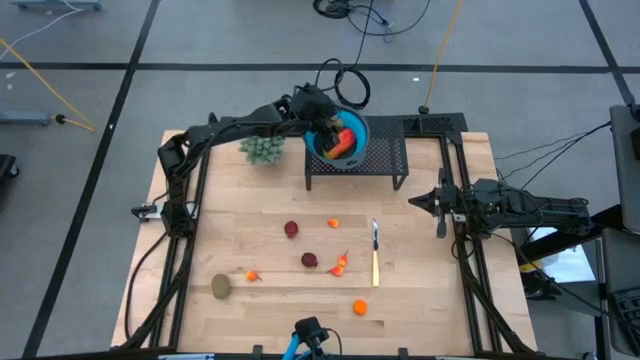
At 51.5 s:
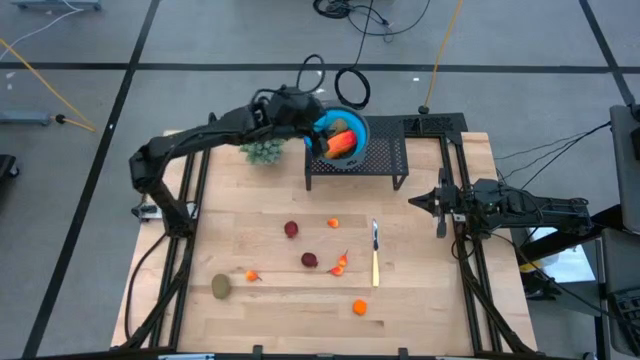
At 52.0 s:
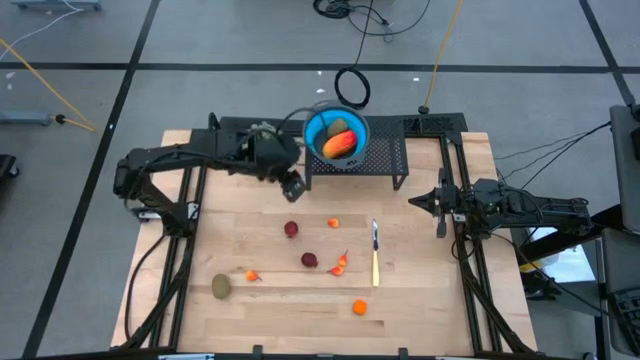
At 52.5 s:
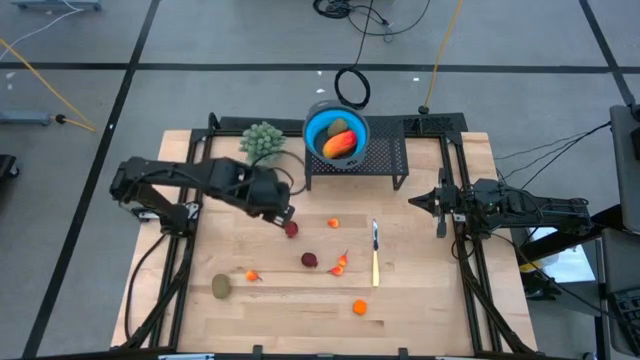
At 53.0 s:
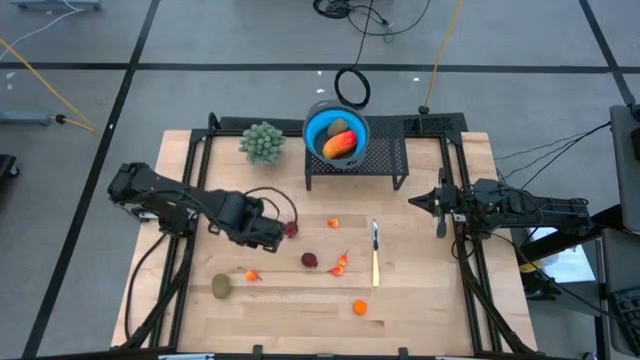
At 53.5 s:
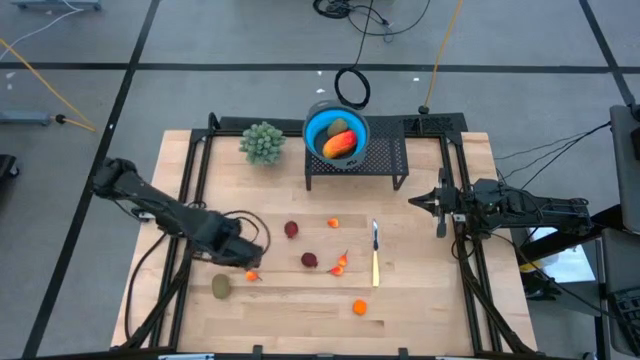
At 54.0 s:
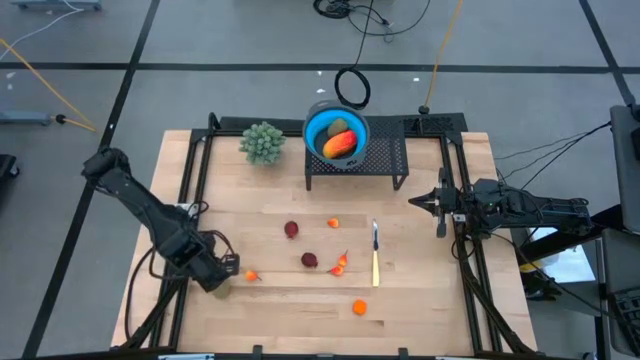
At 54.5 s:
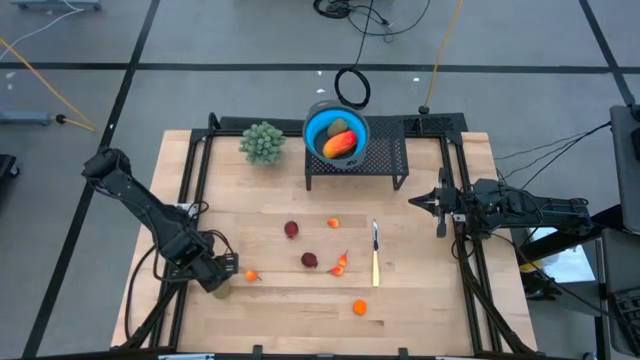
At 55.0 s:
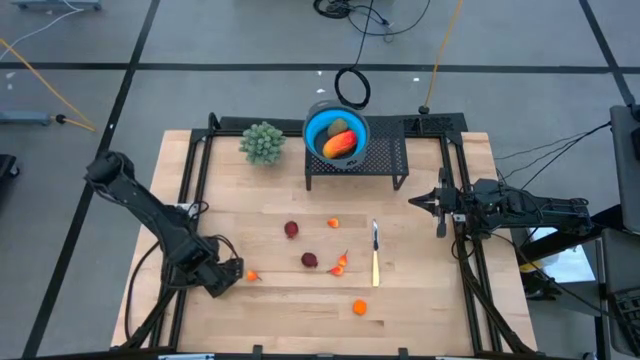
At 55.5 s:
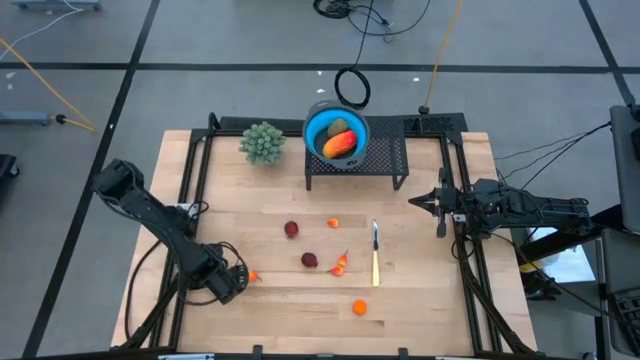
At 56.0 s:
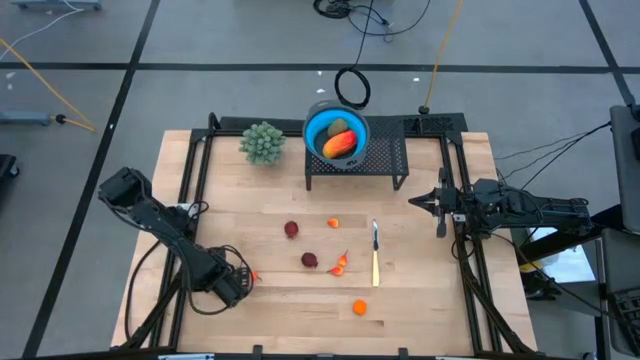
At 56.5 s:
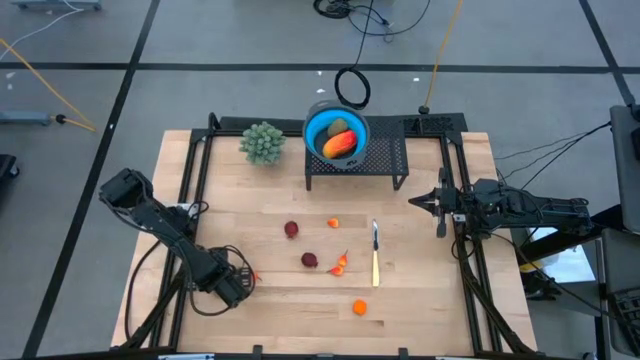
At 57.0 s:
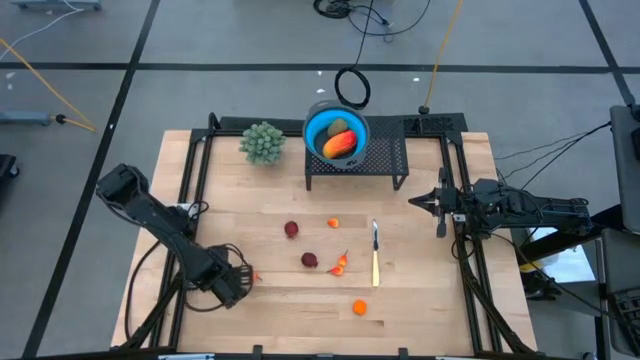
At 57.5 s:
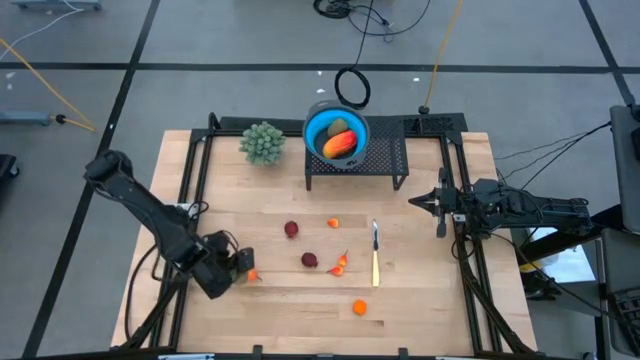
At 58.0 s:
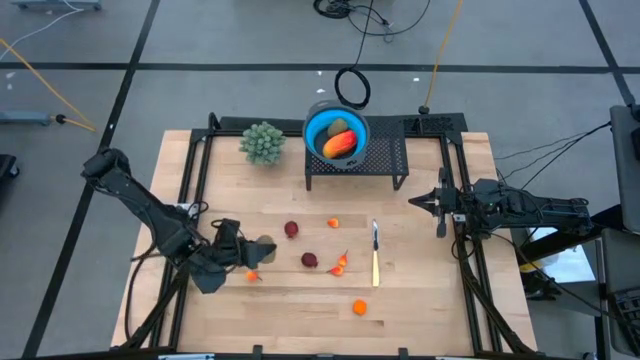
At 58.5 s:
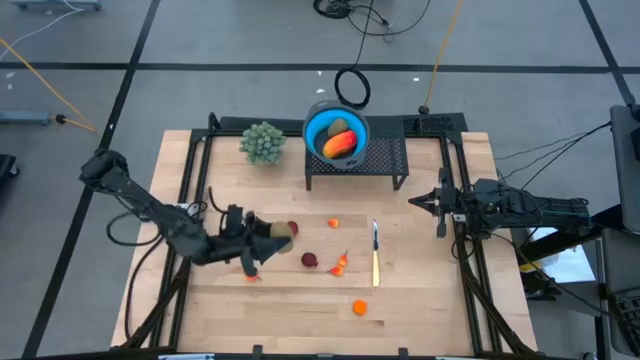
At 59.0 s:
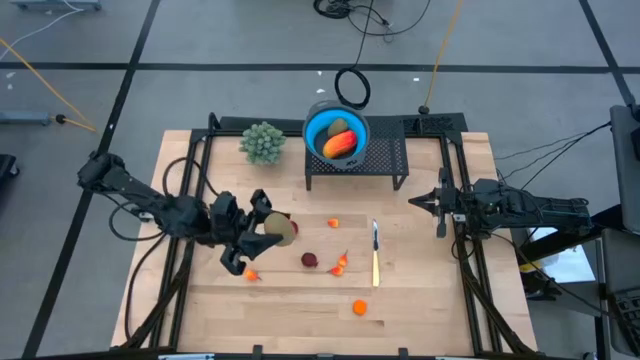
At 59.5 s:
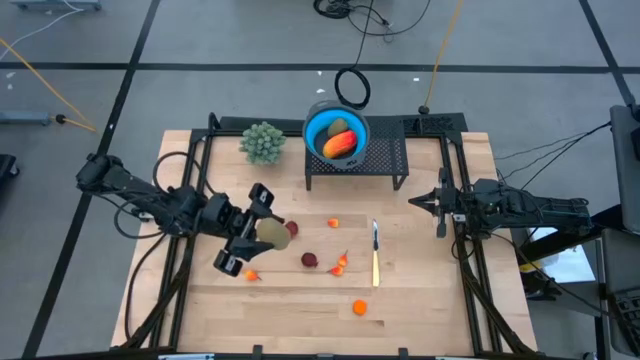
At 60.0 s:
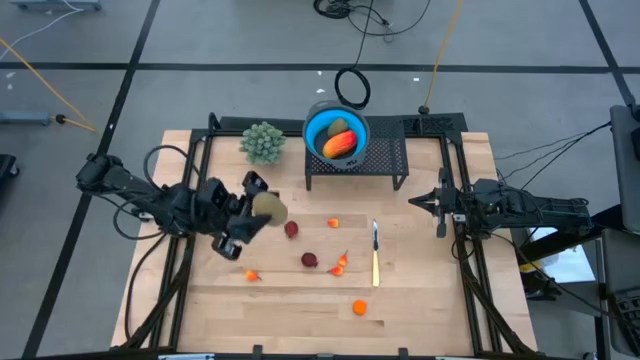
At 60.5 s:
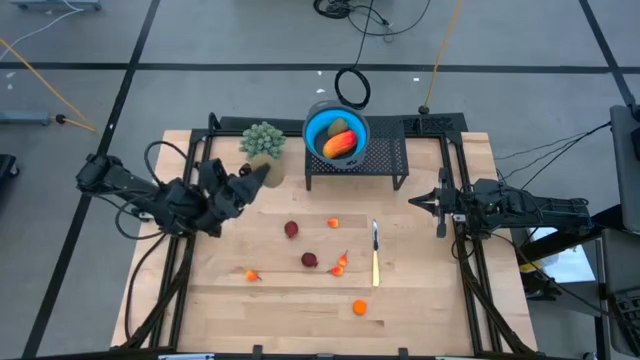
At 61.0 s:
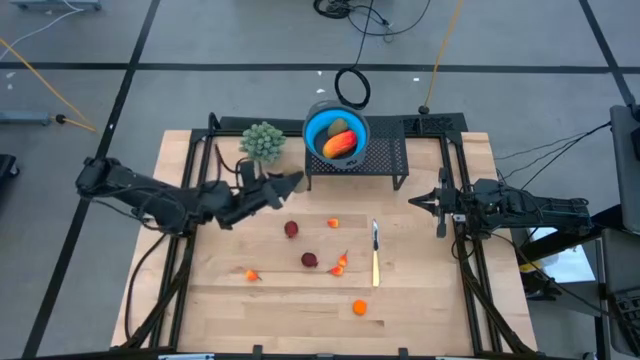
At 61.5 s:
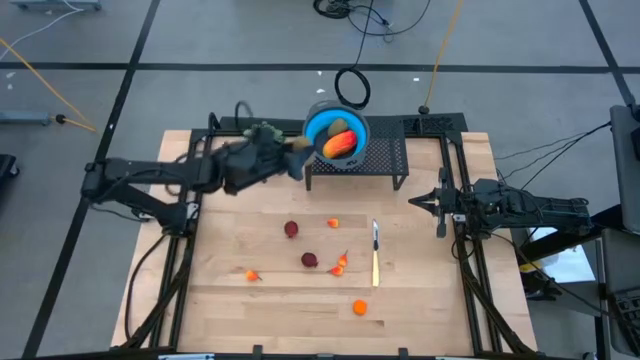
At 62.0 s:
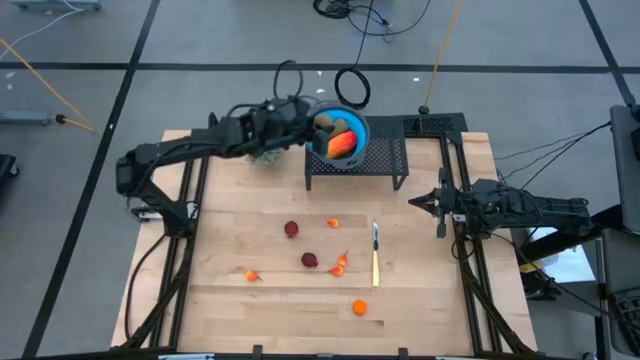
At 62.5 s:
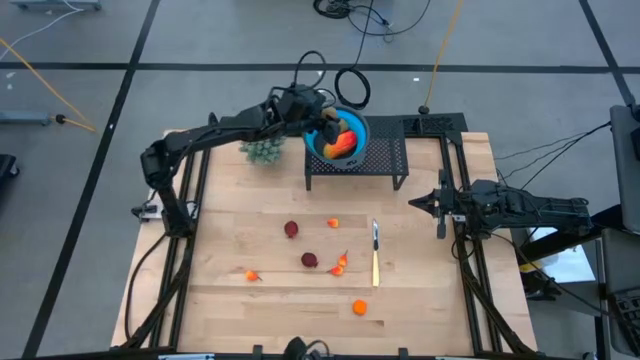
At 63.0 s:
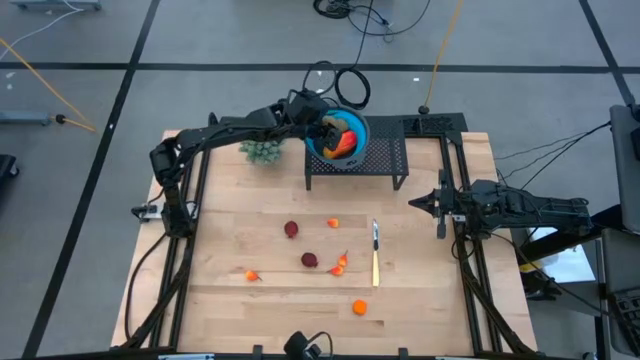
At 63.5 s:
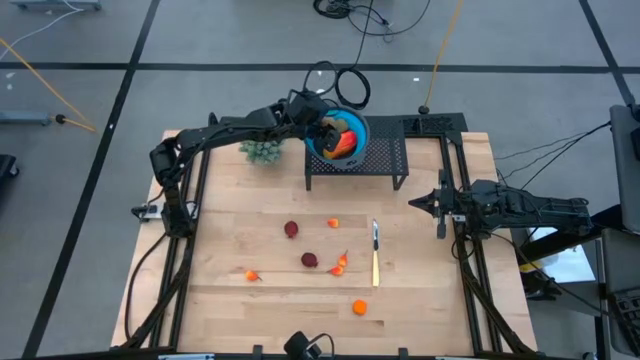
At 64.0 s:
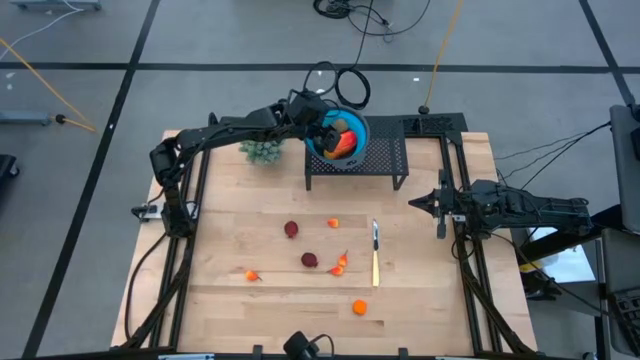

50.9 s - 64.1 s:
Task: Pick & Place Fruit
Put the brown kiwi into the blue strainer bowl on the shelf

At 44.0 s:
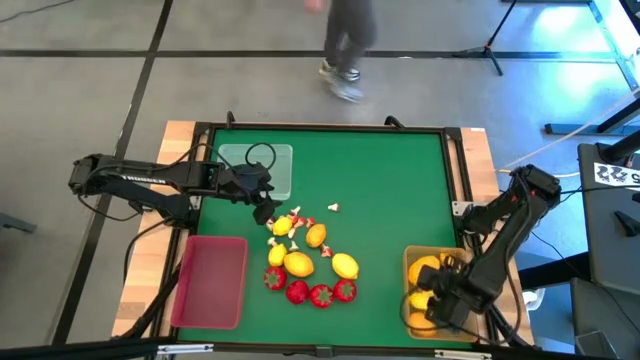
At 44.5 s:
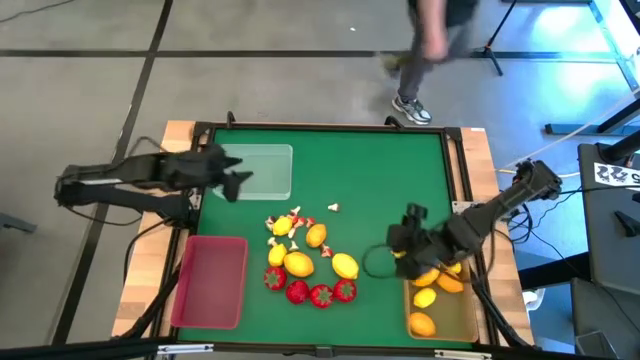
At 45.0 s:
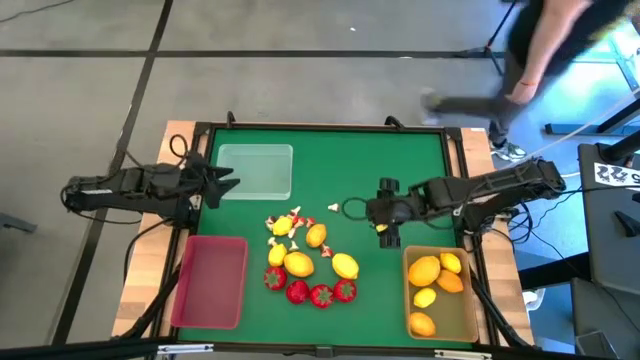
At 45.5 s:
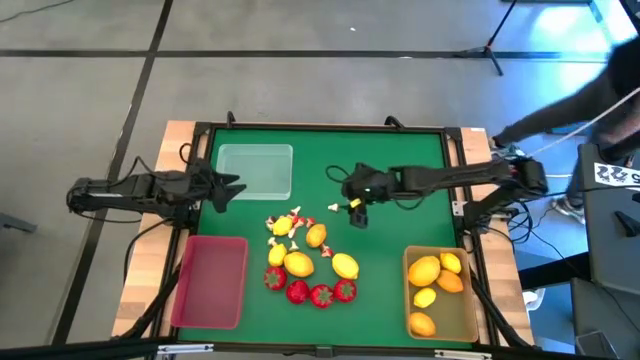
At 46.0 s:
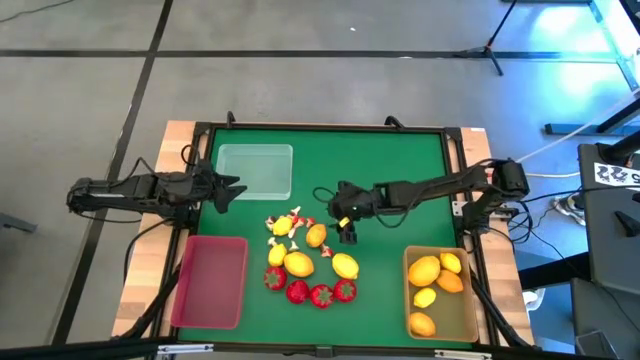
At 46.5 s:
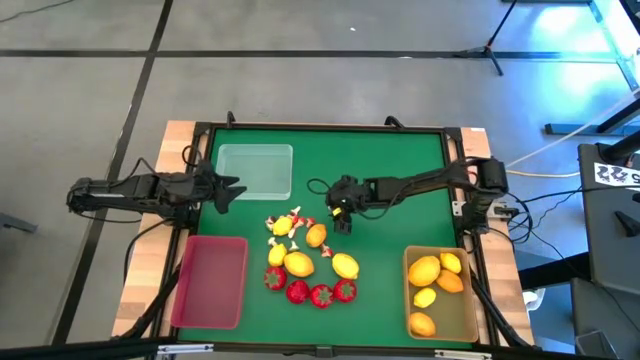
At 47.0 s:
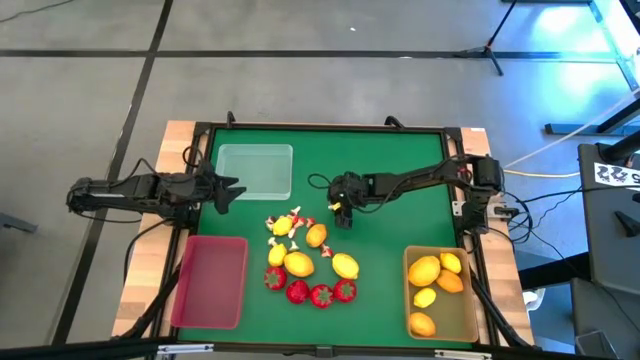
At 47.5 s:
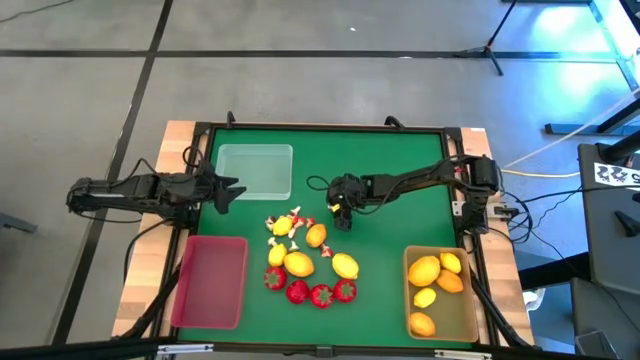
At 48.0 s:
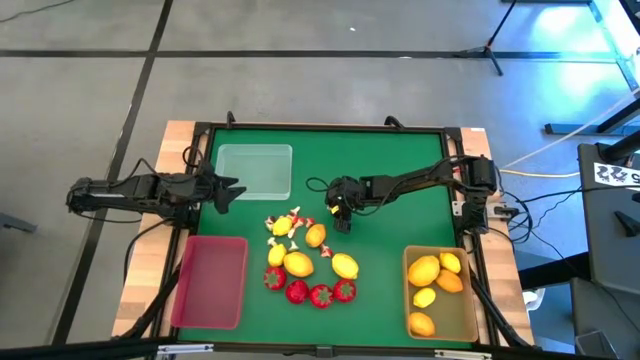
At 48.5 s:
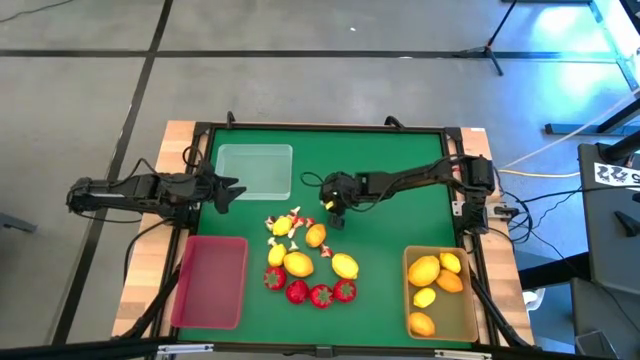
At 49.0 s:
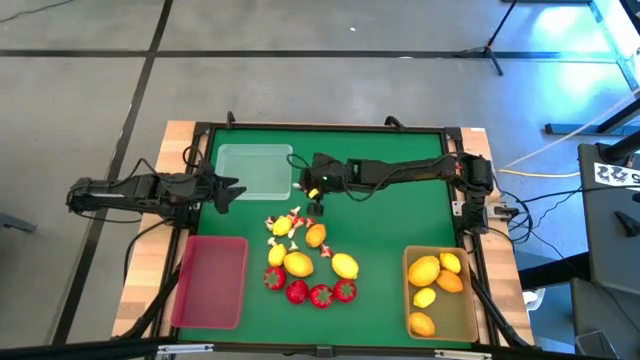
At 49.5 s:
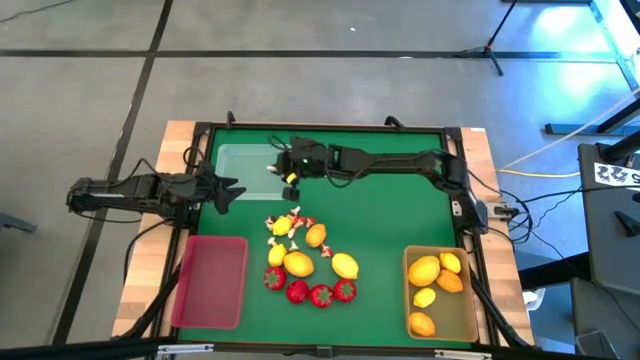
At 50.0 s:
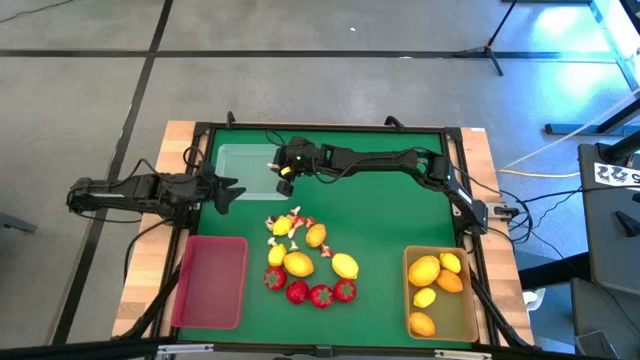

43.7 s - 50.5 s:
Task: Sort produce into baskets
Put the brown mushroom into the transparent bin
